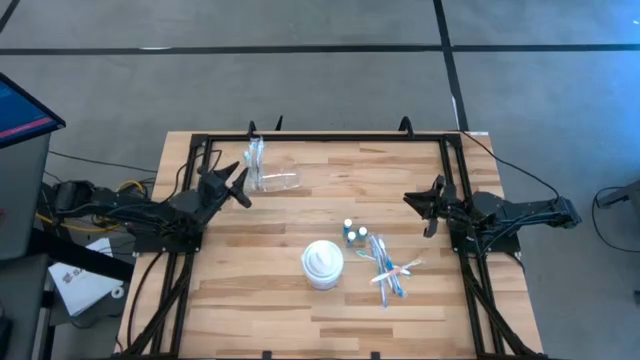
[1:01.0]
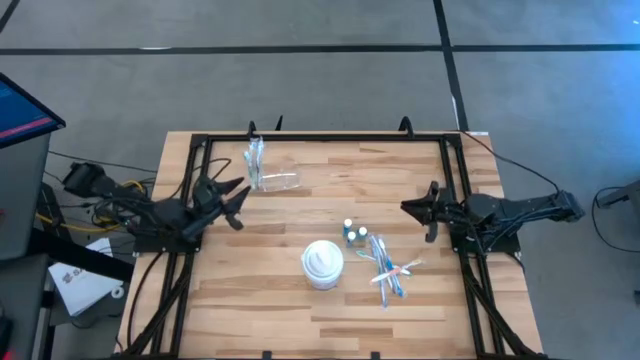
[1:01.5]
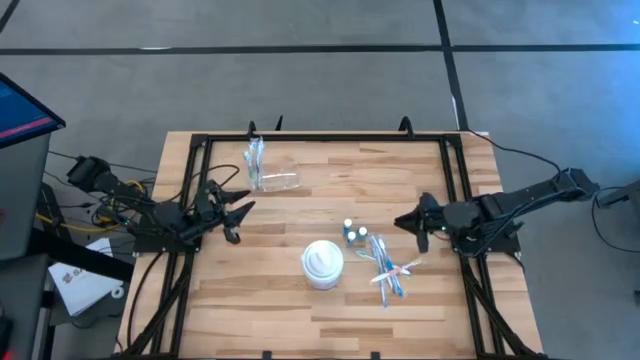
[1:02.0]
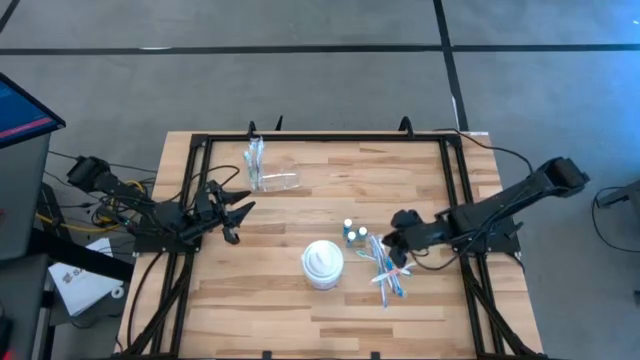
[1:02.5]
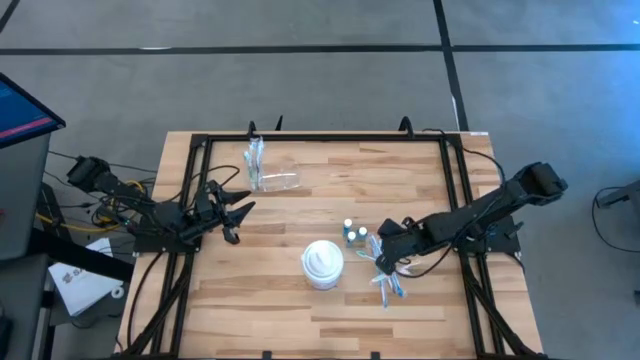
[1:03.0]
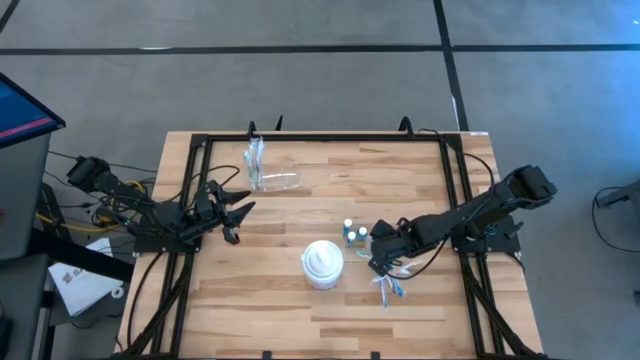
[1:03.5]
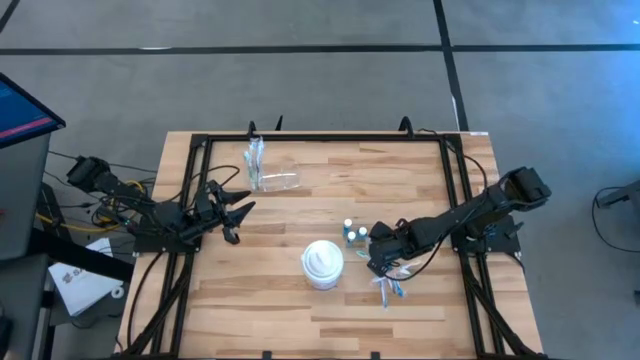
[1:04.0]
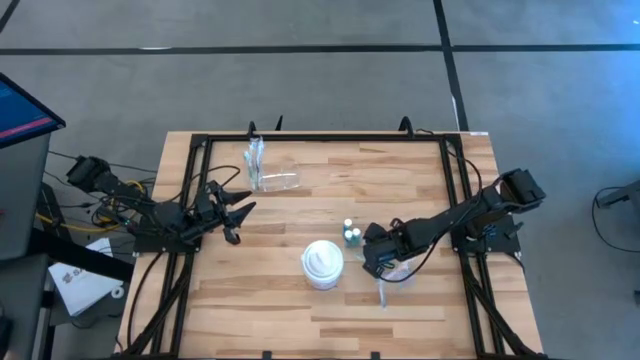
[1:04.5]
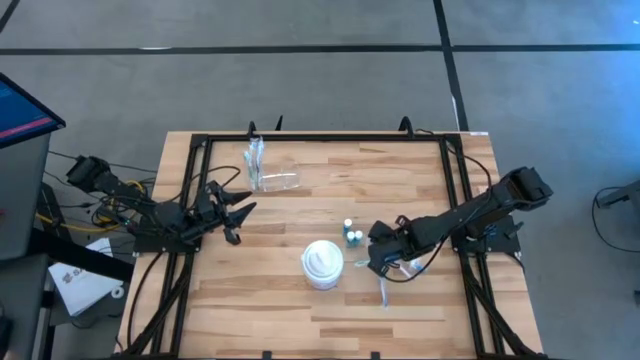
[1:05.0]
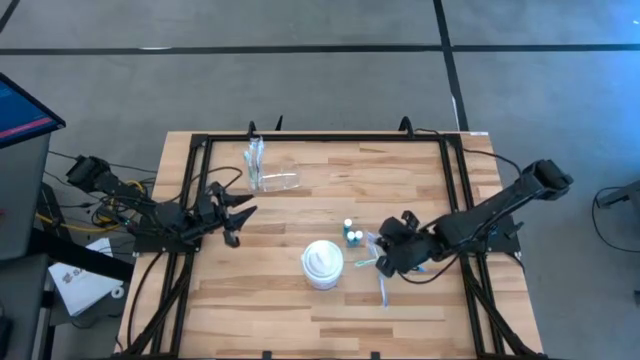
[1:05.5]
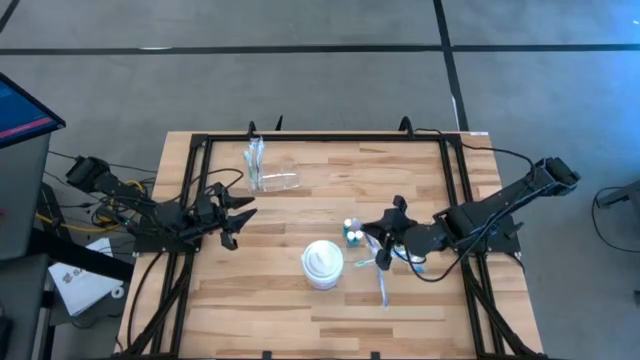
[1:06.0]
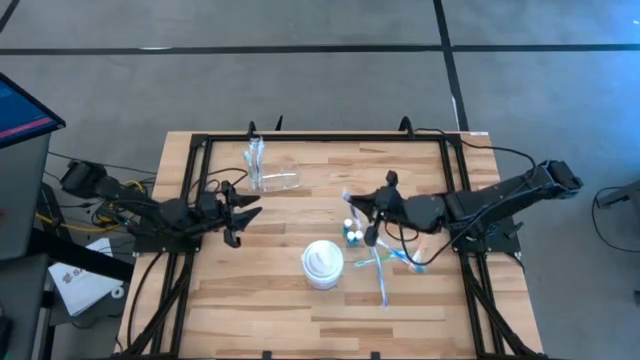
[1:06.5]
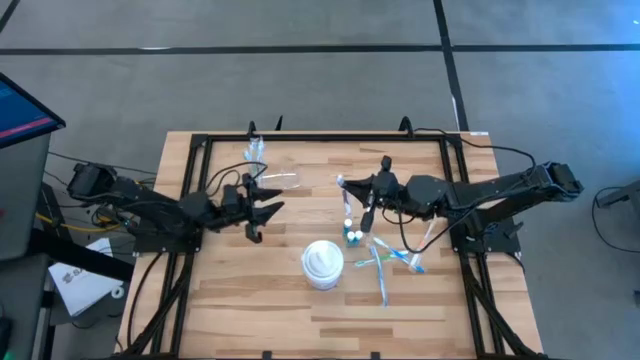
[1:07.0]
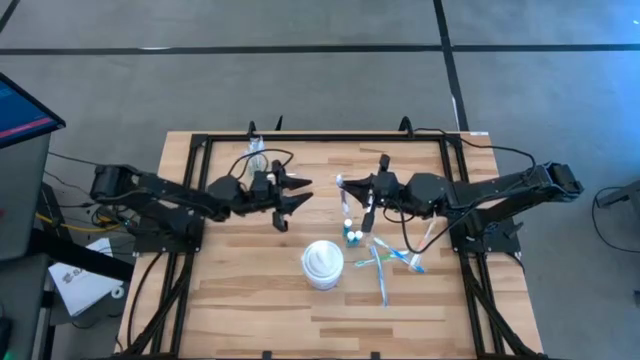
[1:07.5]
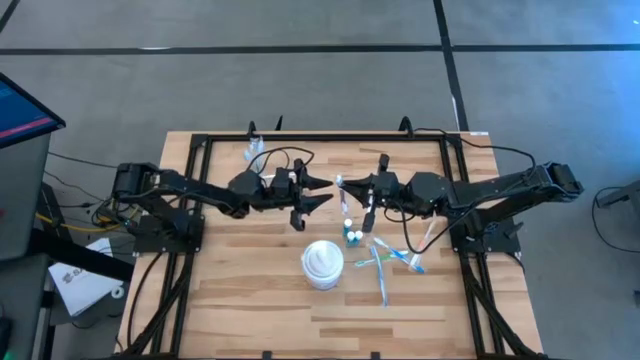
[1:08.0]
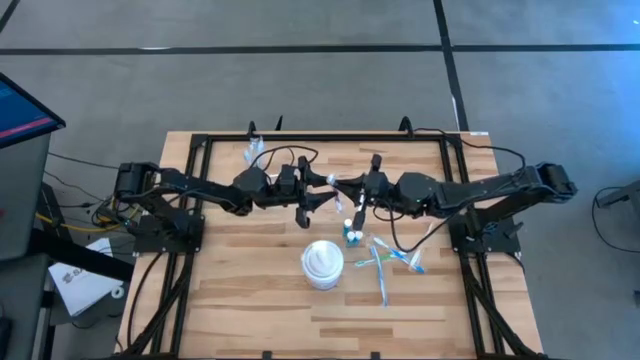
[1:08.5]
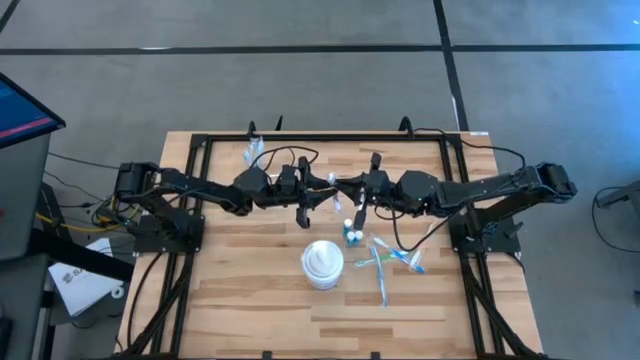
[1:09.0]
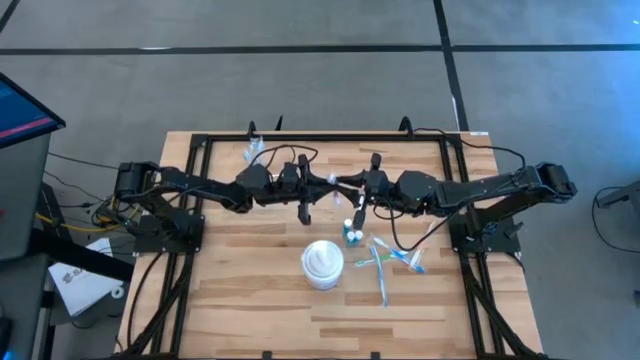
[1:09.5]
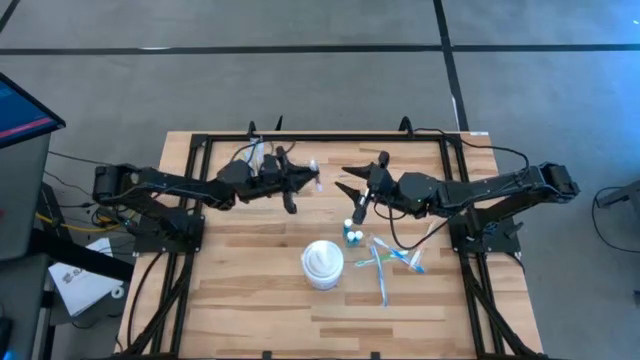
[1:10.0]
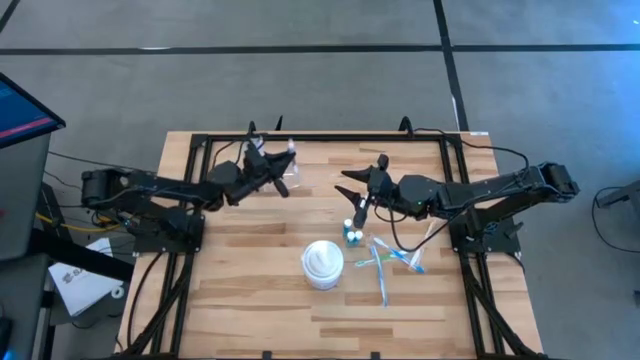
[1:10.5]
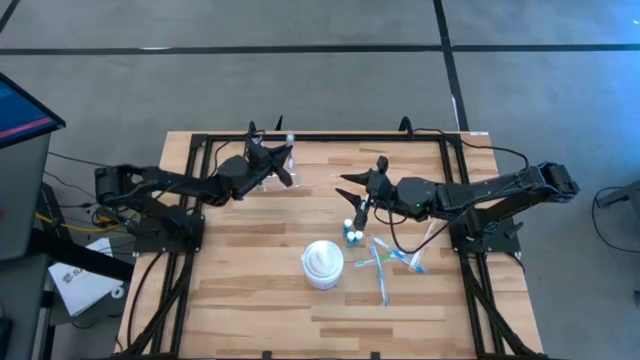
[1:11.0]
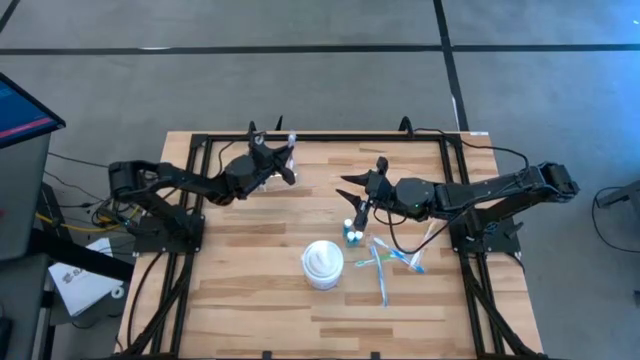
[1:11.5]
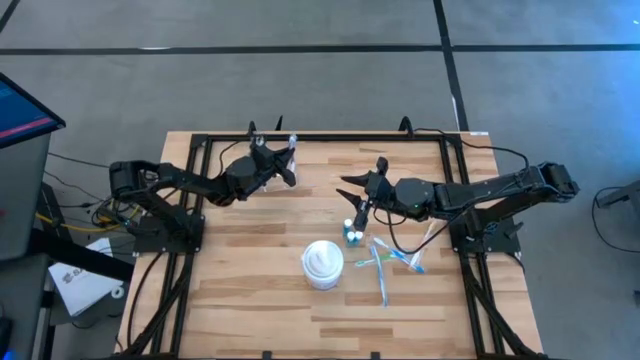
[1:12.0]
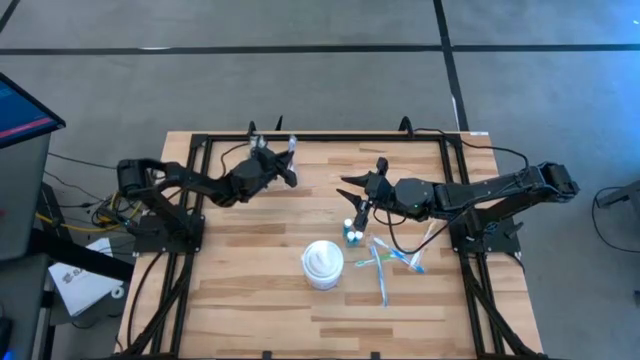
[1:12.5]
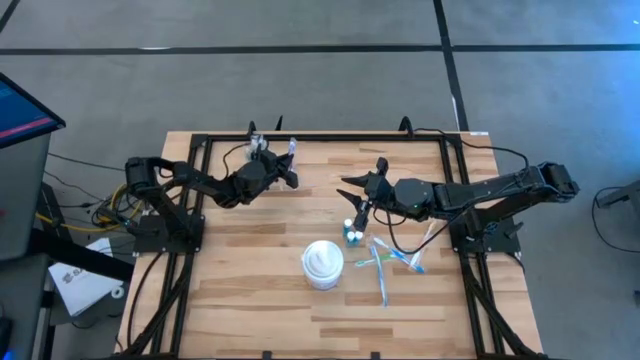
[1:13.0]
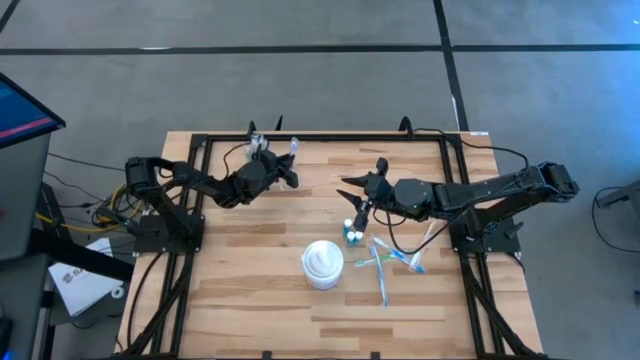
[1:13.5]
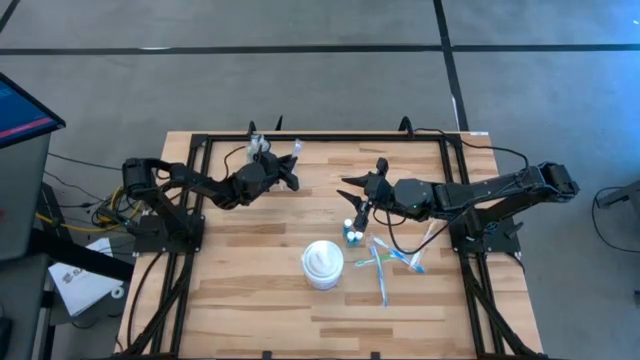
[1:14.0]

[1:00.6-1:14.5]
Task: Pick & Place toothbrushing station
Put the purple toothbrush into the transparent organizer

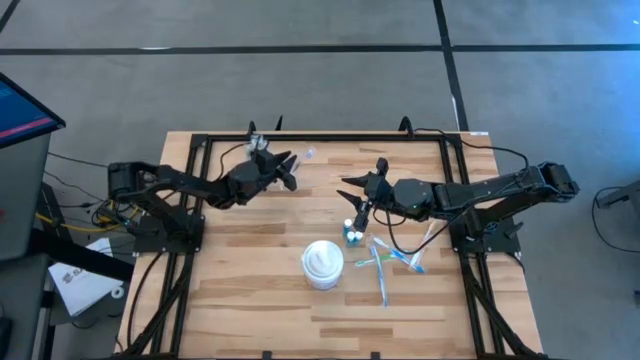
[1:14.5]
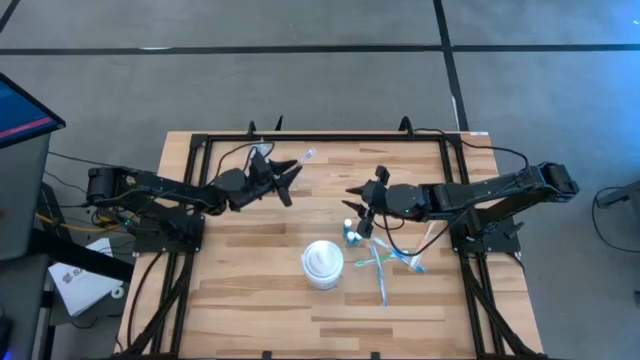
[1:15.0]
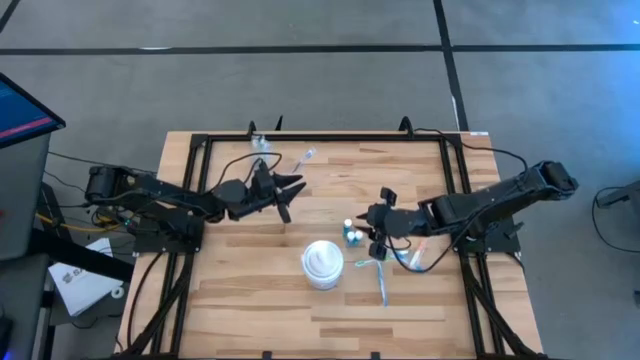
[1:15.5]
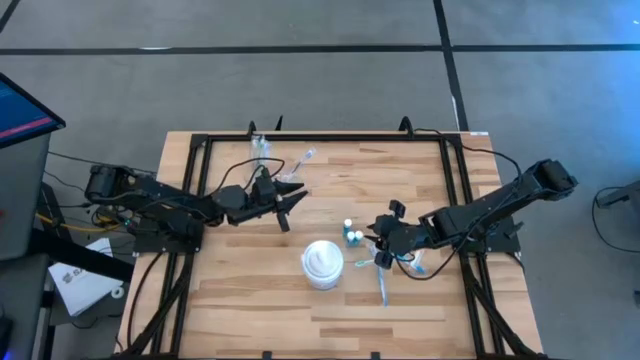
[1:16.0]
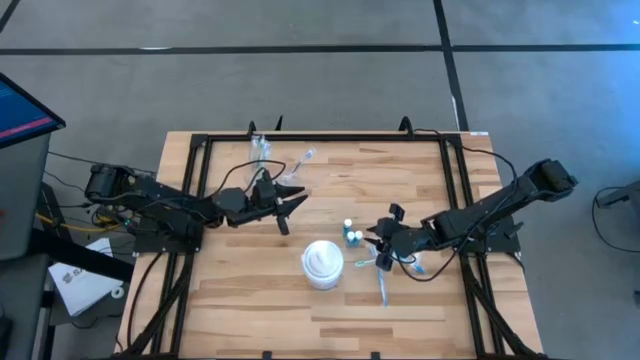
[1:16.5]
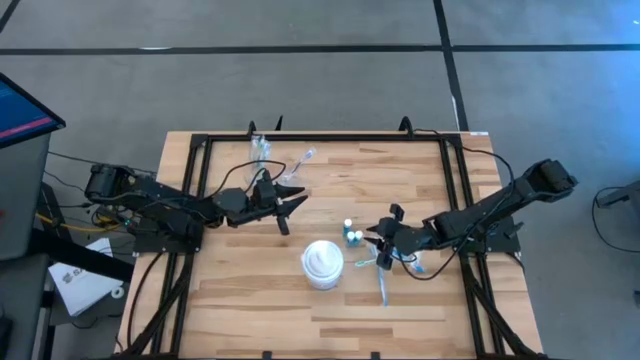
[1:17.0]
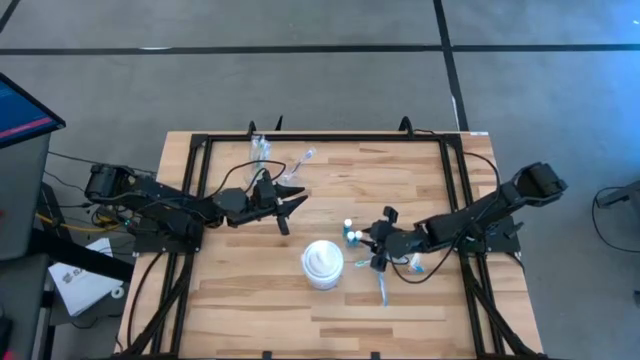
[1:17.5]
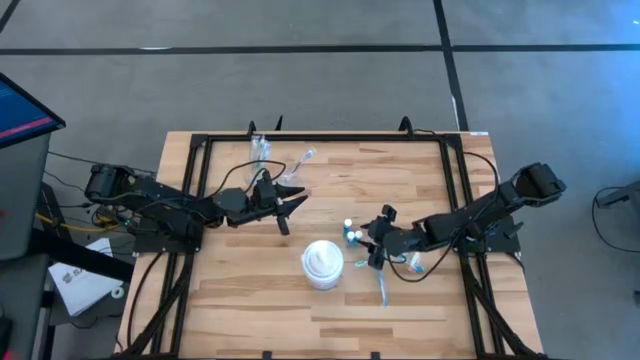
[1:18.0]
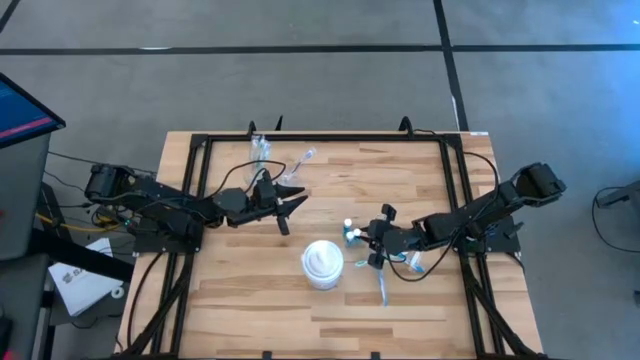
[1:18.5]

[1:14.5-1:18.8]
Put the blue mouthwash into the transparent organizer

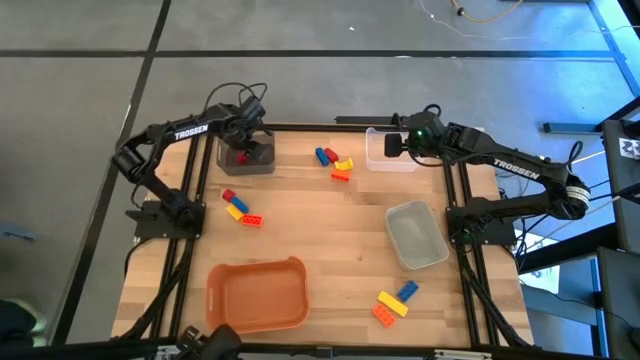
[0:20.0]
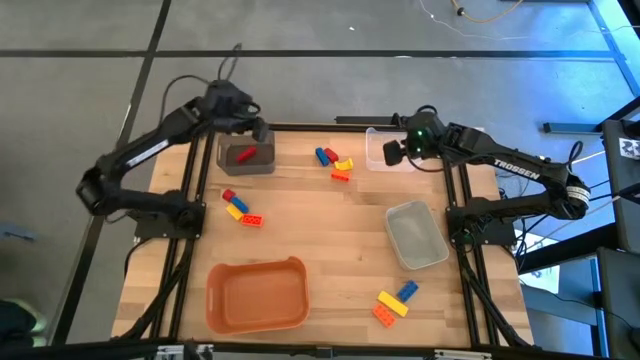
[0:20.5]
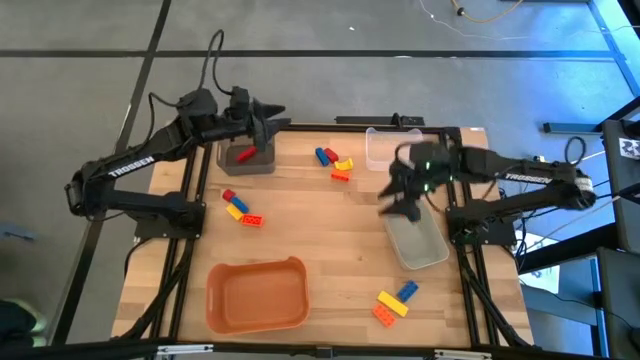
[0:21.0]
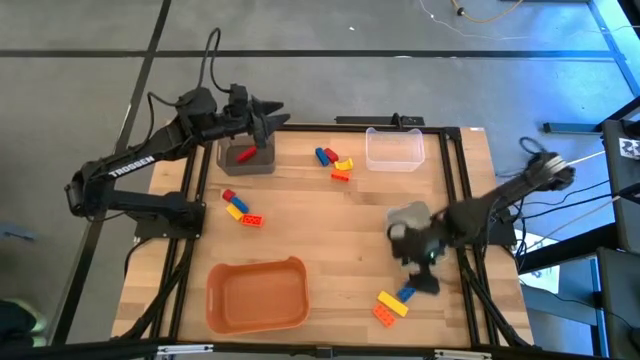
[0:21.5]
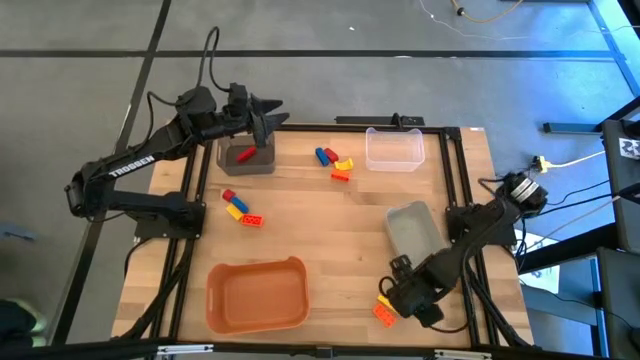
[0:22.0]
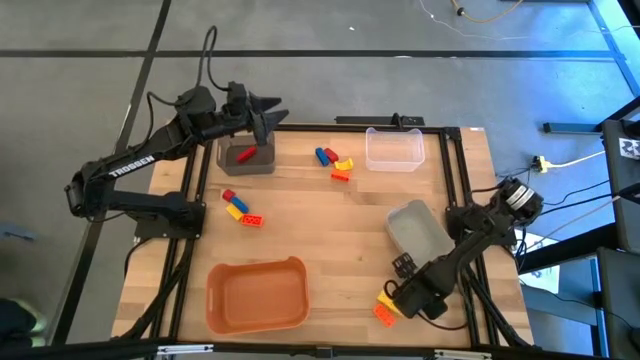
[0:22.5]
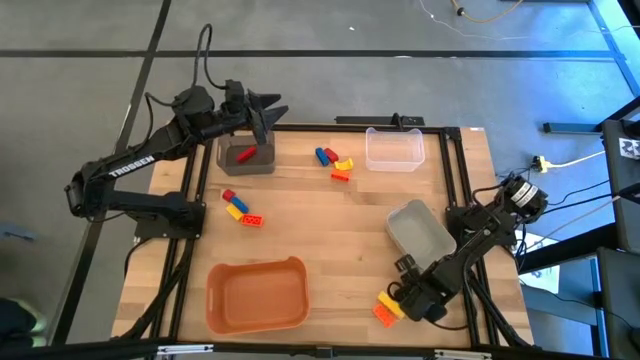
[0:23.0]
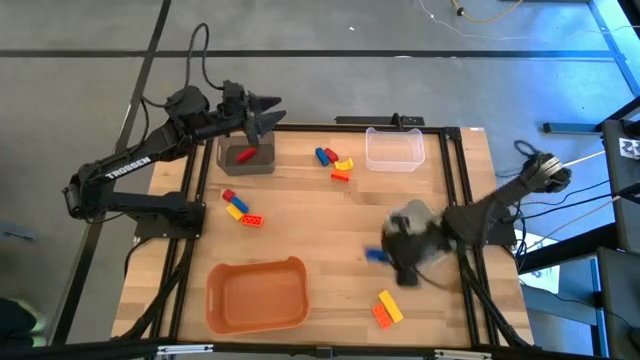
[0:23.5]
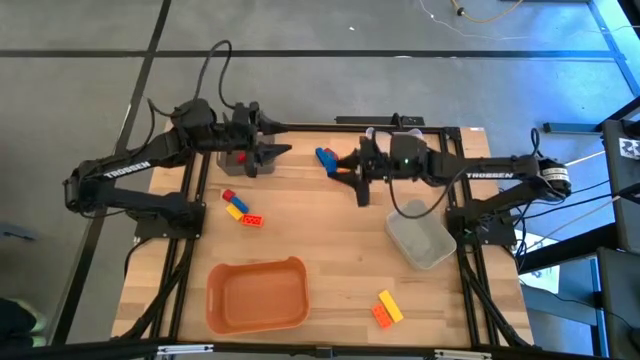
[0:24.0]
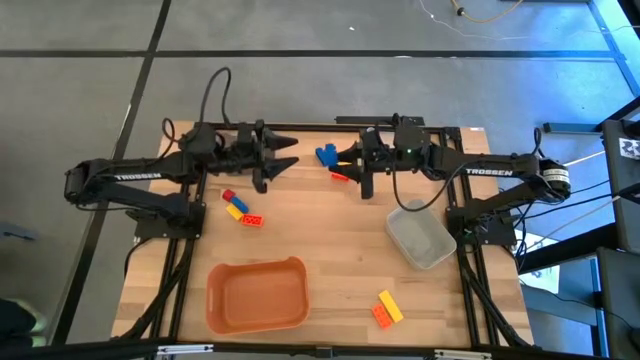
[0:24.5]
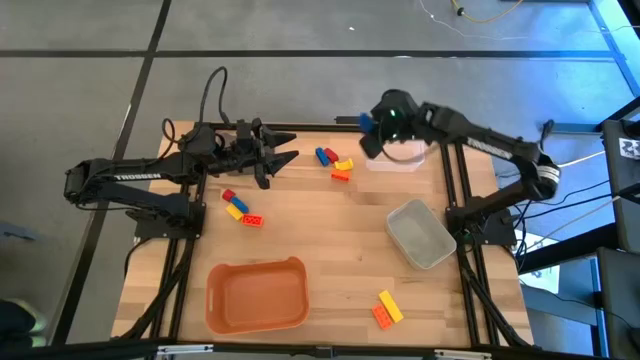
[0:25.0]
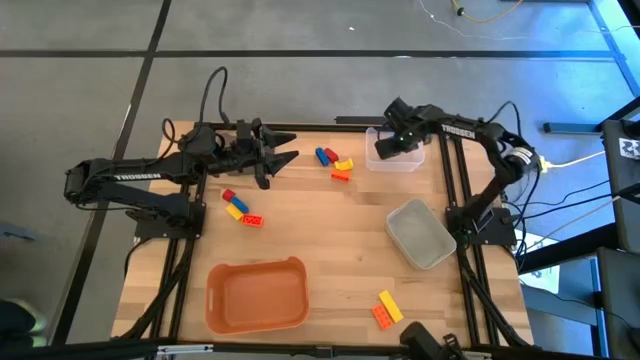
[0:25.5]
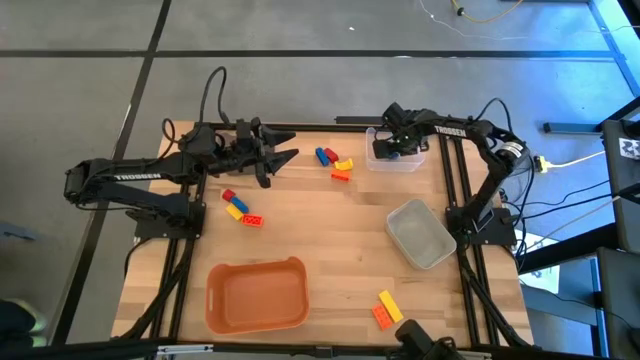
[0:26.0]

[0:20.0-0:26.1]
Task: Sort & place blocks by color
Put the bottom blue game piece into the transparent bin
